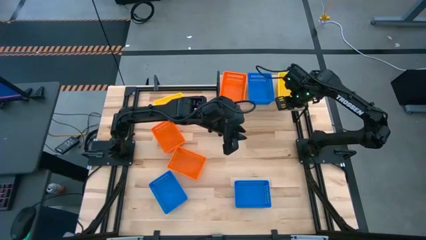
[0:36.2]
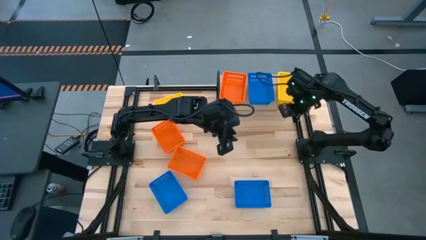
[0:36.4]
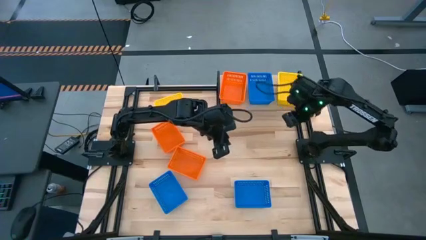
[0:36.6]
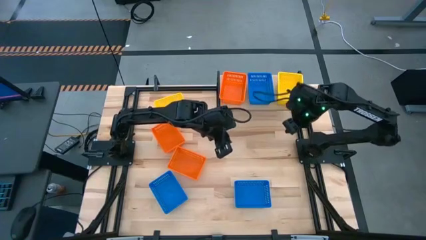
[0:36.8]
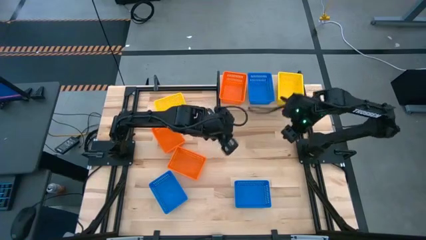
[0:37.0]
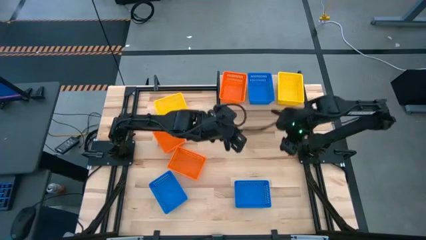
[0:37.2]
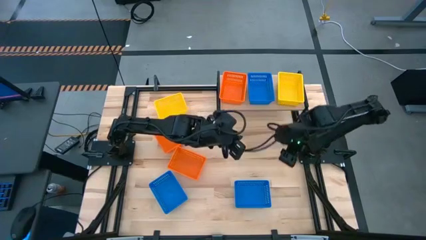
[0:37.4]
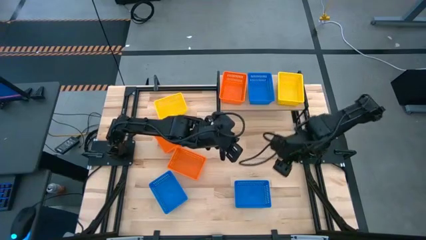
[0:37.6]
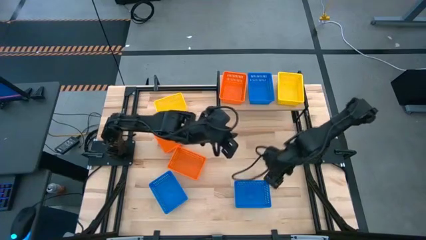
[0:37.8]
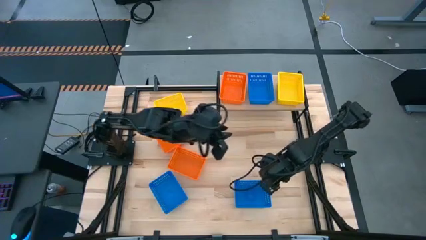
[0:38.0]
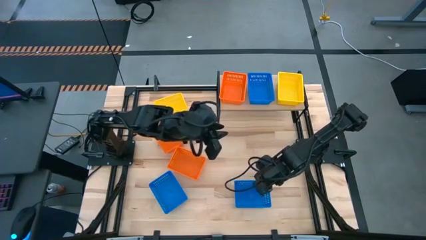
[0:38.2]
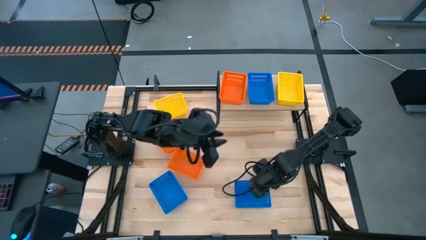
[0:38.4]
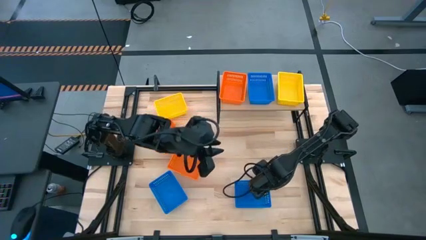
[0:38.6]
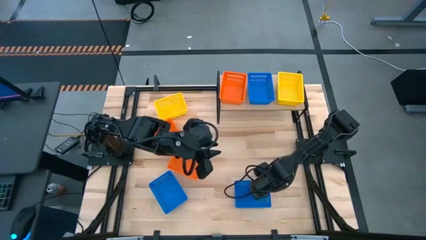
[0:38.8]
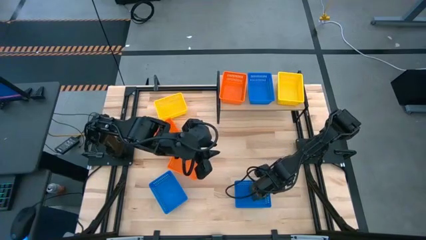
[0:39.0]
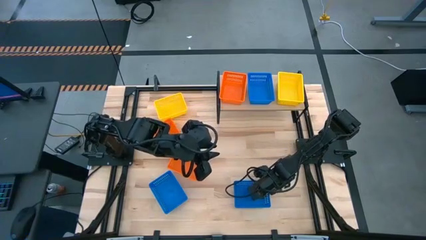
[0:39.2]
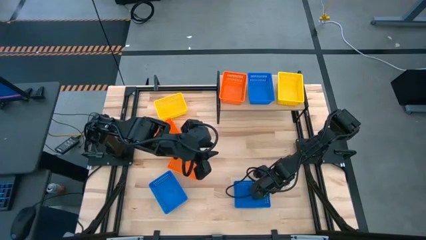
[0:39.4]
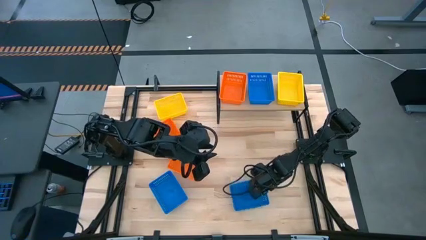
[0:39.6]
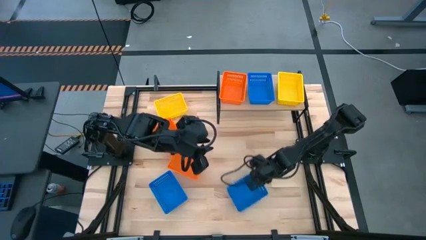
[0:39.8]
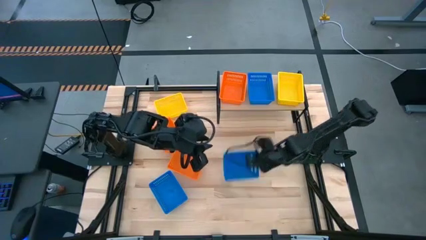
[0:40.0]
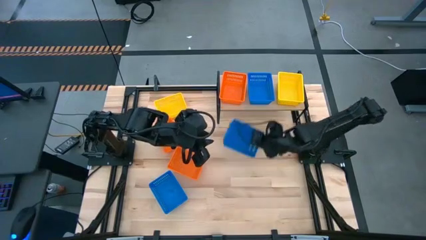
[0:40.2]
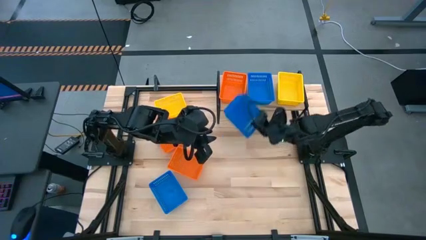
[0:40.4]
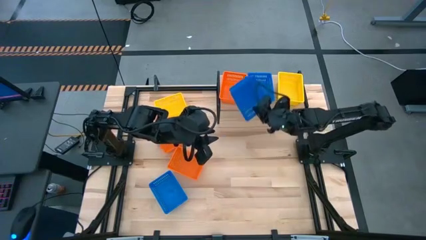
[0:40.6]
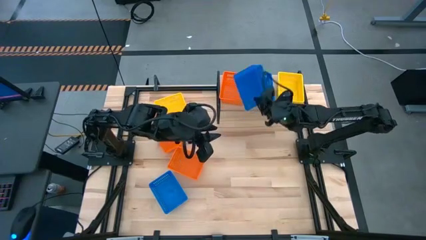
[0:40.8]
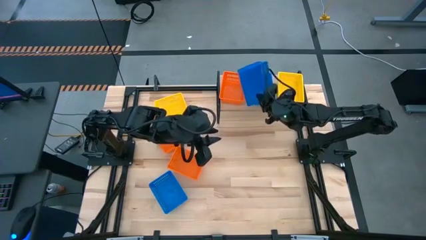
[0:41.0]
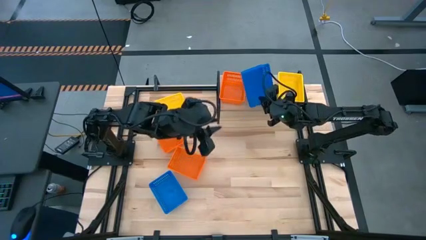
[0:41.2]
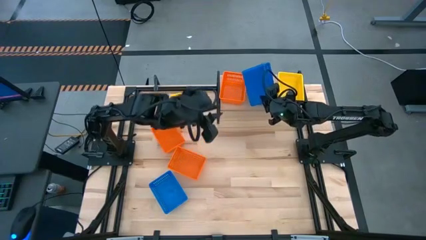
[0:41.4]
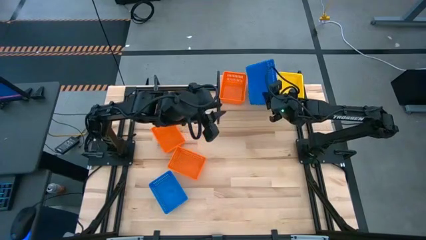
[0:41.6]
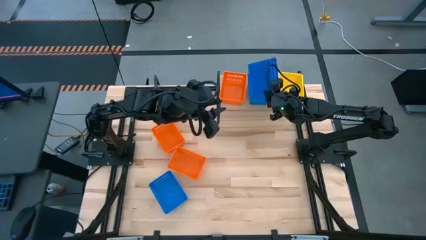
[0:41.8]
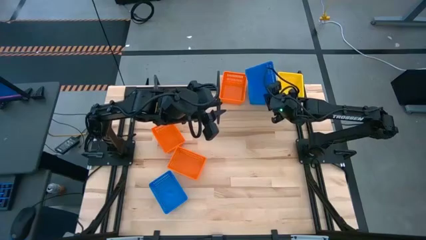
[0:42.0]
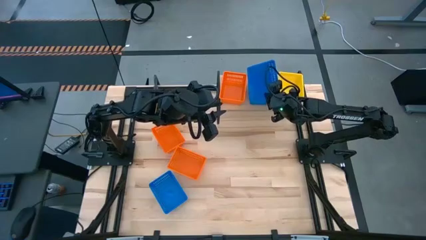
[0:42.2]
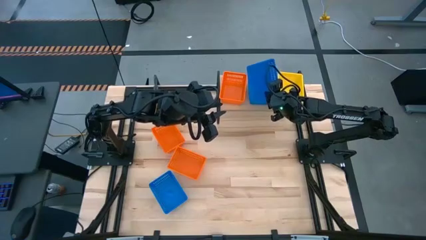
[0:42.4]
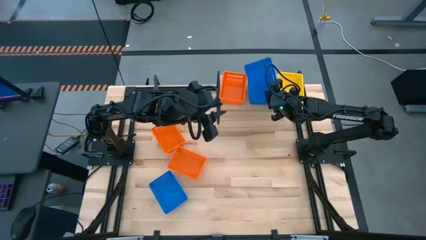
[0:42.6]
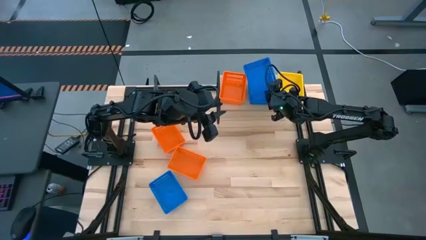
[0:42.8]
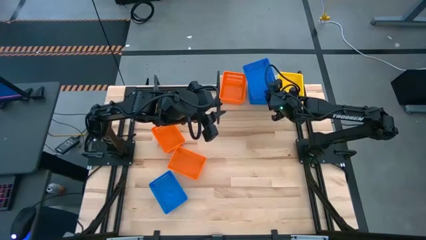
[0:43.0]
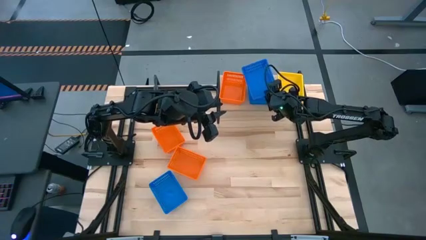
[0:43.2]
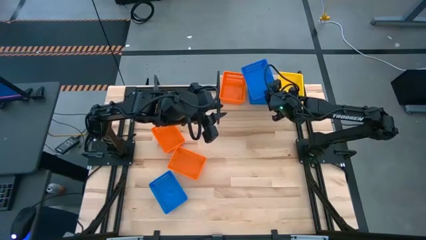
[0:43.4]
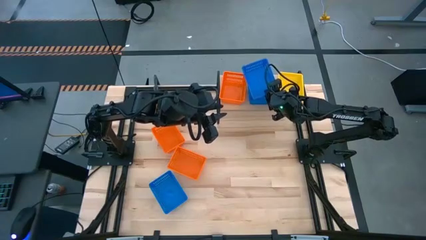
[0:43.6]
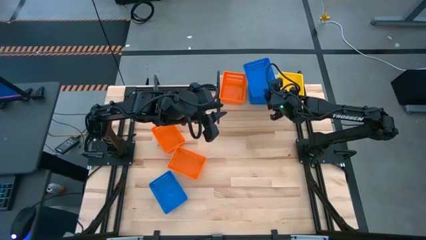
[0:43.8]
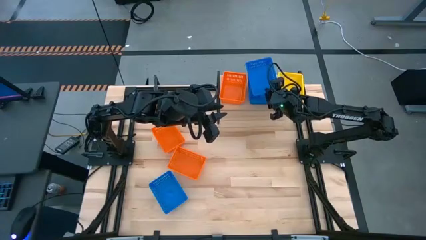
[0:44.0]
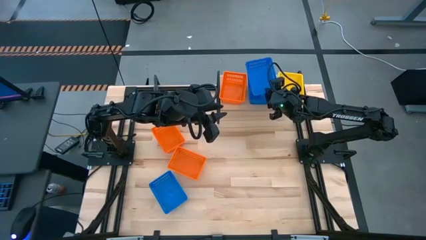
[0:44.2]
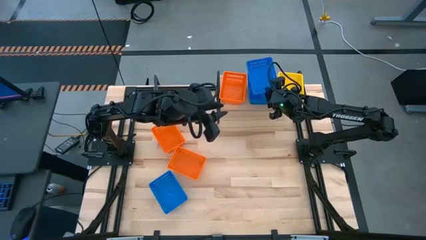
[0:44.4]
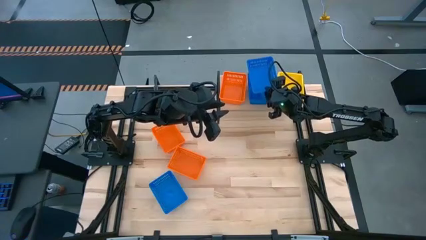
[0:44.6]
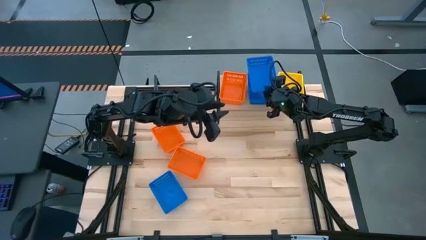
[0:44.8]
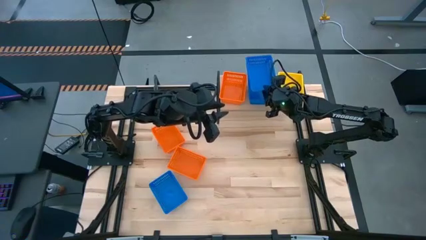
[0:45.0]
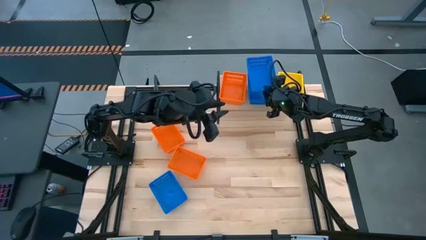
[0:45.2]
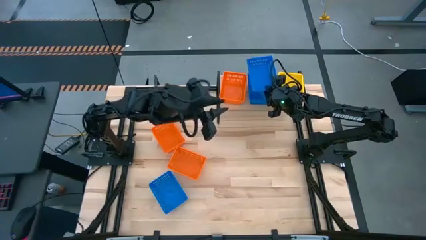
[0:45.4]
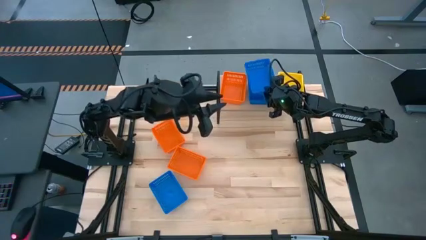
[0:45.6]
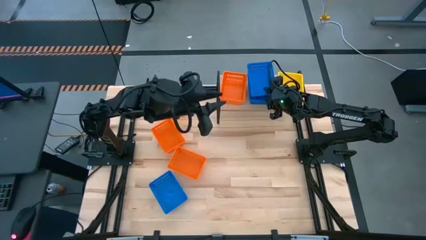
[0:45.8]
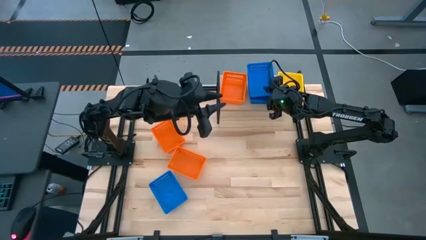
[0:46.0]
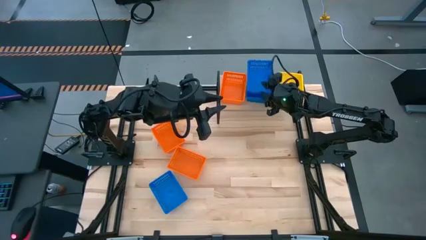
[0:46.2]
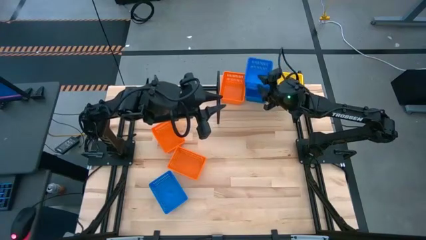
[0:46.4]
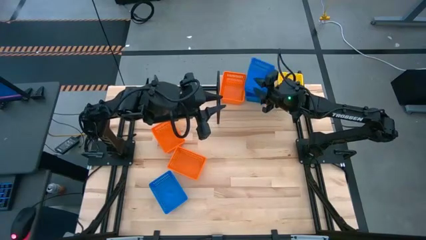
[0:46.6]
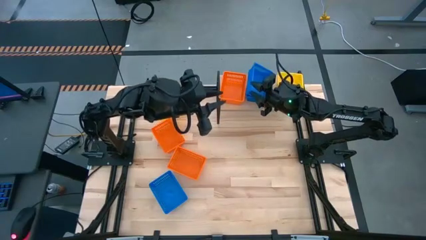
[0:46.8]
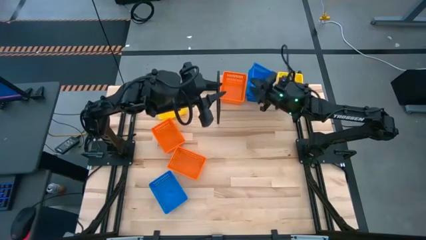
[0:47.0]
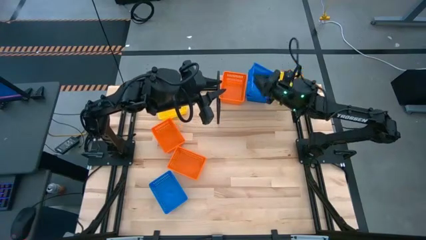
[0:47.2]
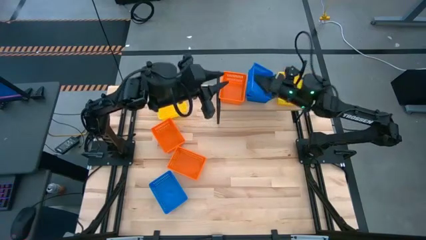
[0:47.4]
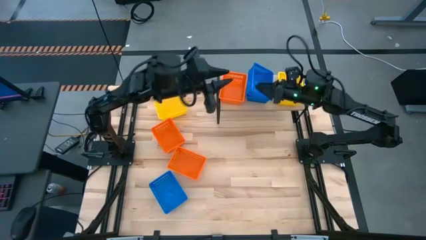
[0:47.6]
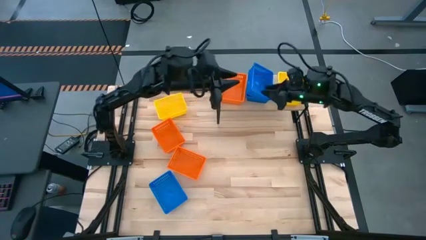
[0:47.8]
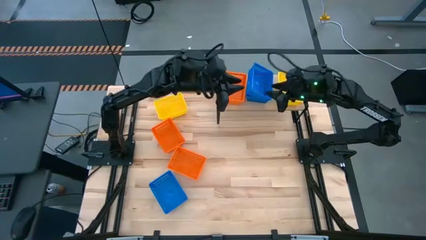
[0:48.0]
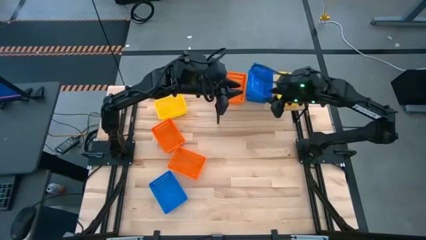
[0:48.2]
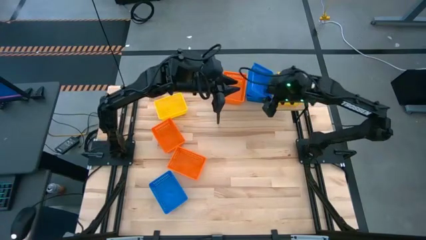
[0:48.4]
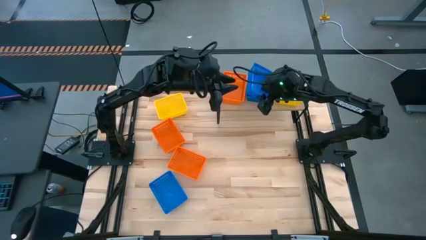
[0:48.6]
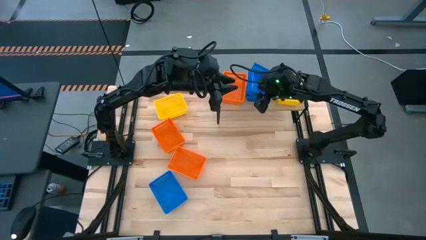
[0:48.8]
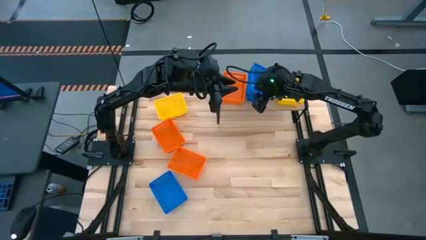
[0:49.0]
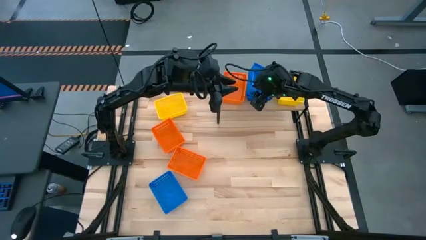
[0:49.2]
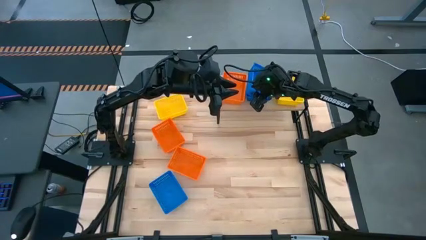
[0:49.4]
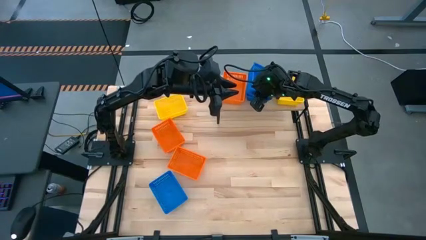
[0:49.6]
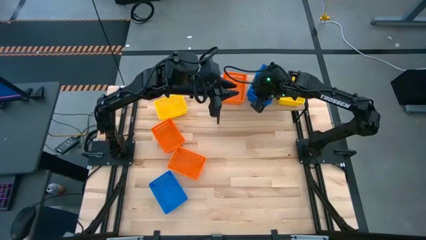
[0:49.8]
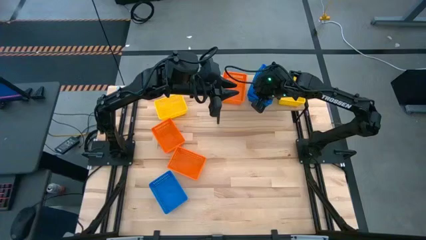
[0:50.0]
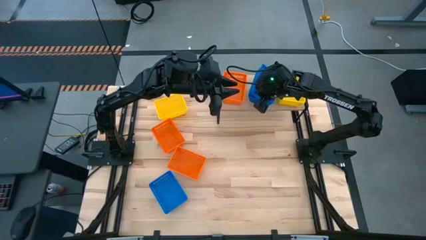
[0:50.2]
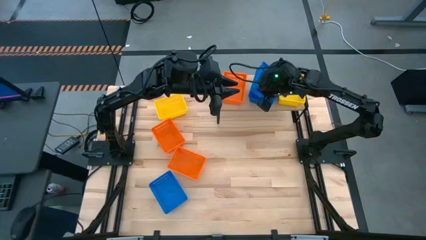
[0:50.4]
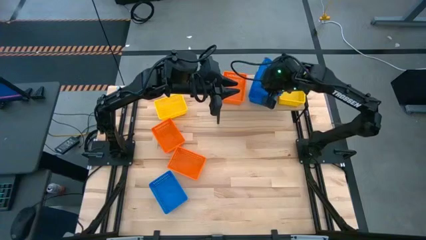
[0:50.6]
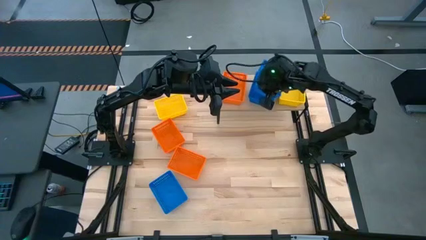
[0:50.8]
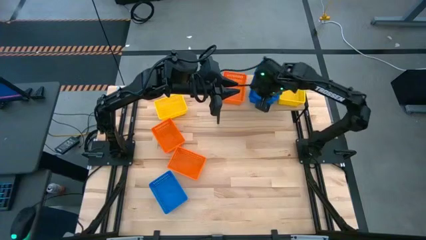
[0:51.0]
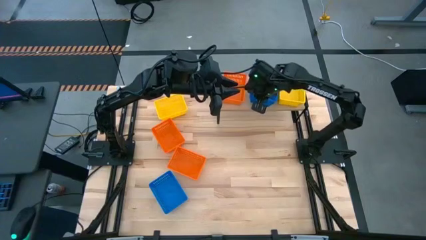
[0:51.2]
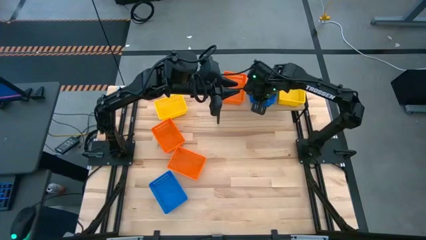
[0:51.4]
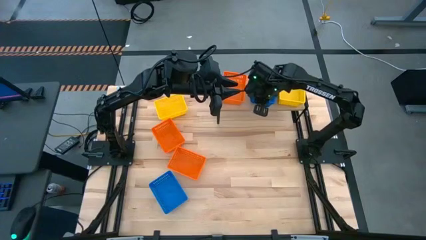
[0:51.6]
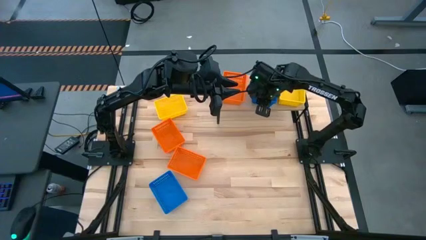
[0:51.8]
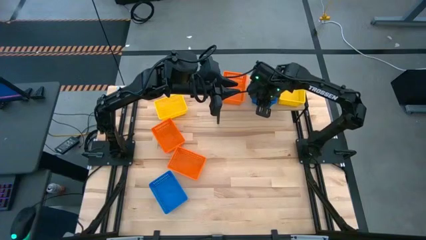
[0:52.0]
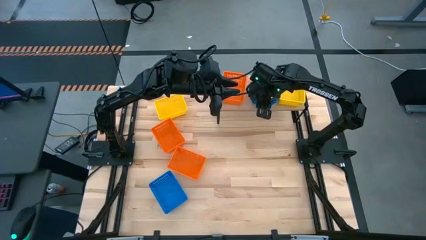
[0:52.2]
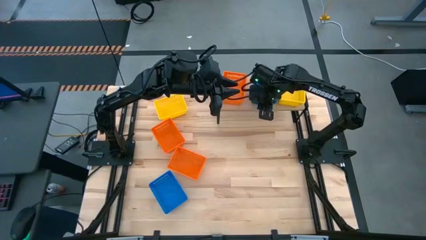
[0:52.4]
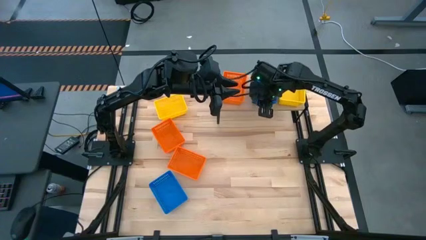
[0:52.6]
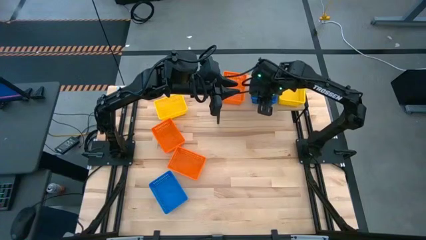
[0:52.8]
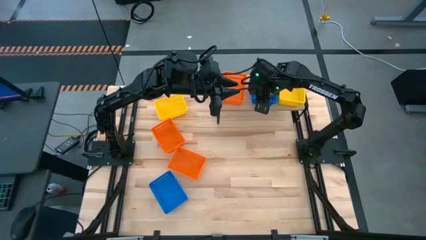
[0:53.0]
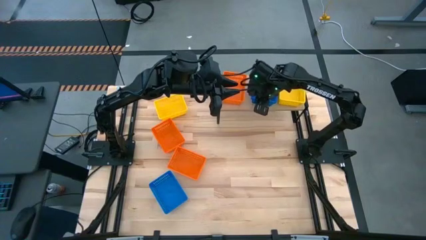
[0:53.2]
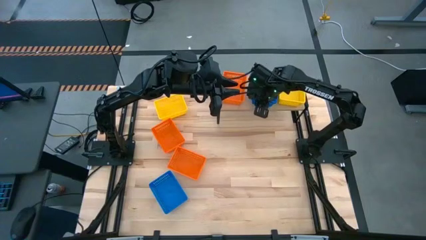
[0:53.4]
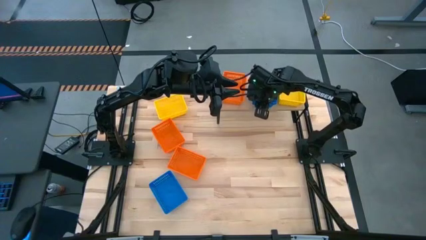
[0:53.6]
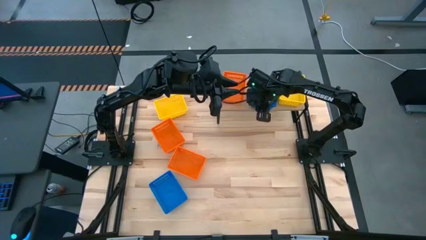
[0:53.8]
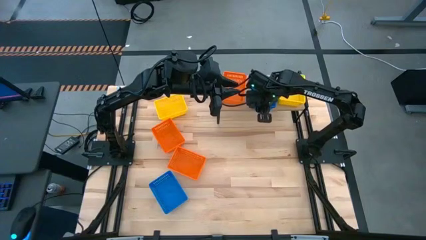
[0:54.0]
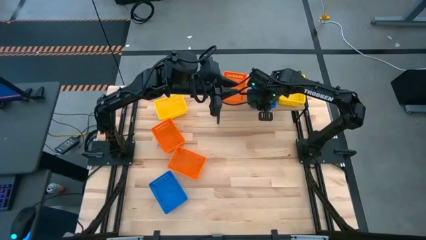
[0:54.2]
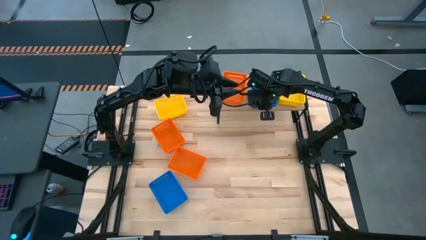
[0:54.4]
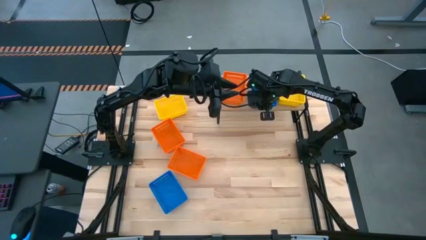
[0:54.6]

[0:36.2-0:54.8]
Task: Stack baskets on shelf by color
Stack the right blue basket on top of the blue basket on the shelf
